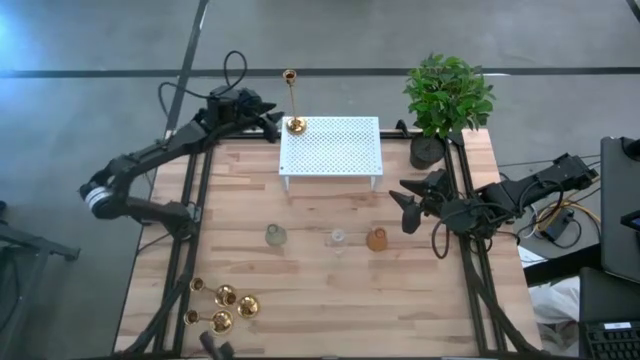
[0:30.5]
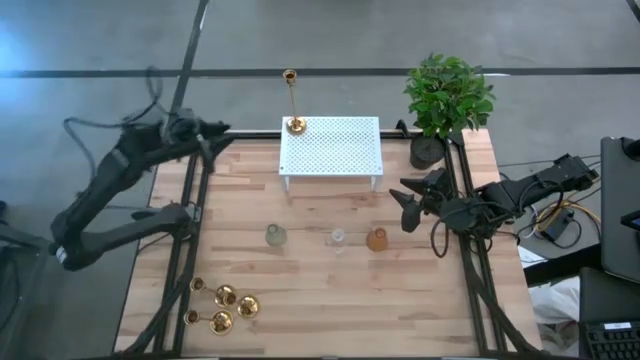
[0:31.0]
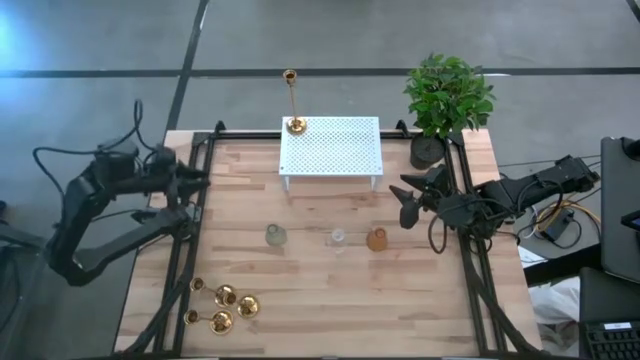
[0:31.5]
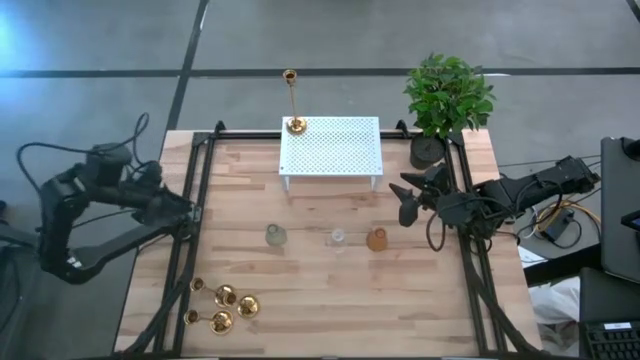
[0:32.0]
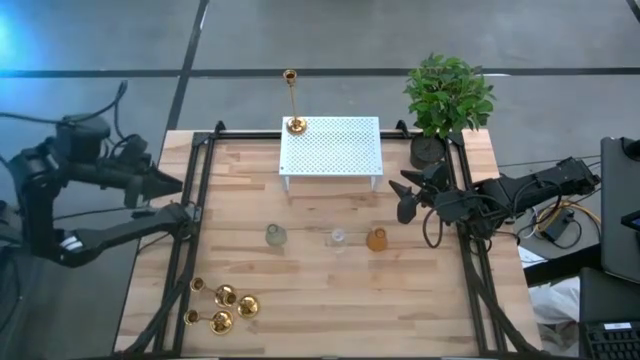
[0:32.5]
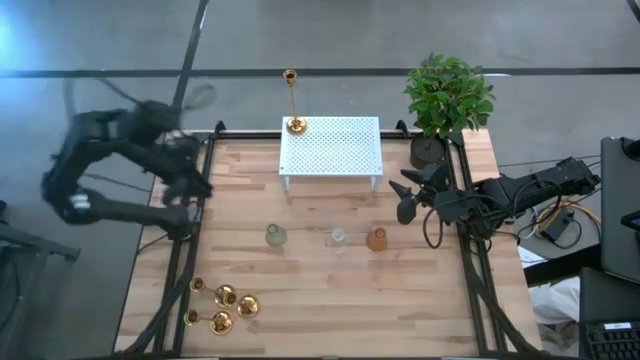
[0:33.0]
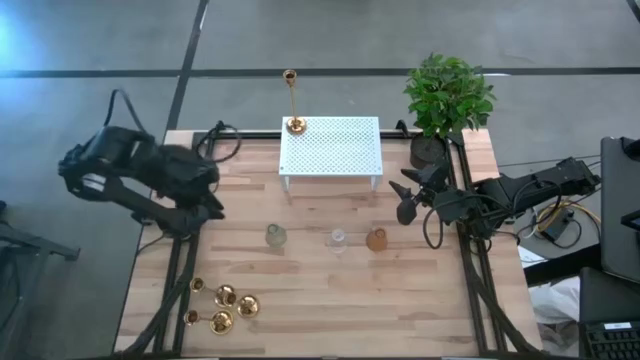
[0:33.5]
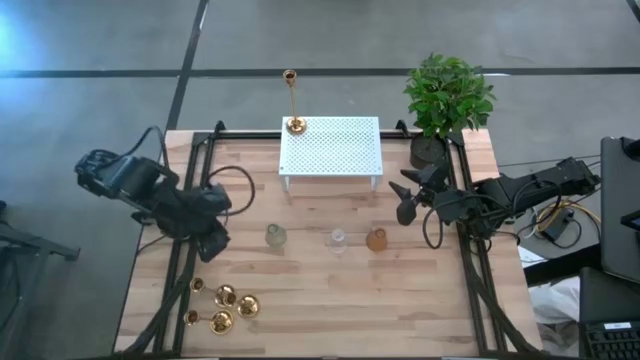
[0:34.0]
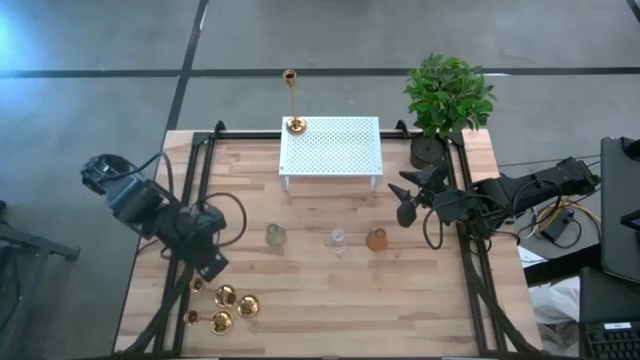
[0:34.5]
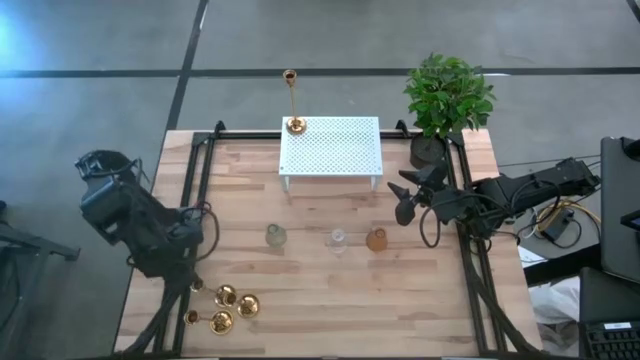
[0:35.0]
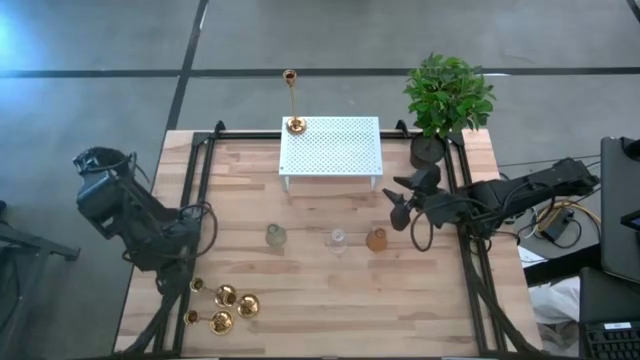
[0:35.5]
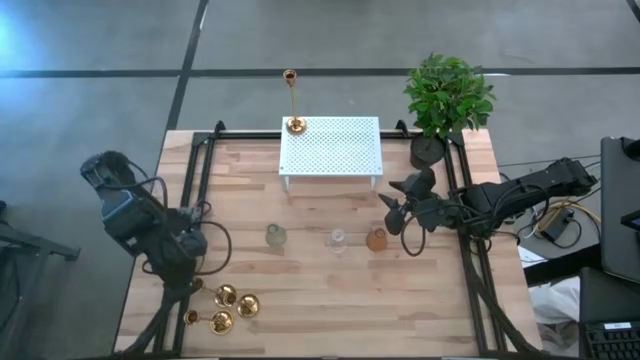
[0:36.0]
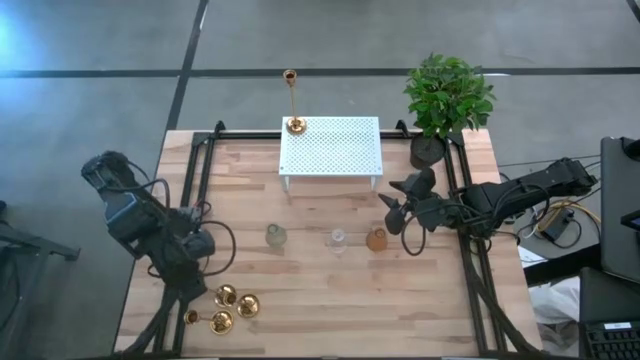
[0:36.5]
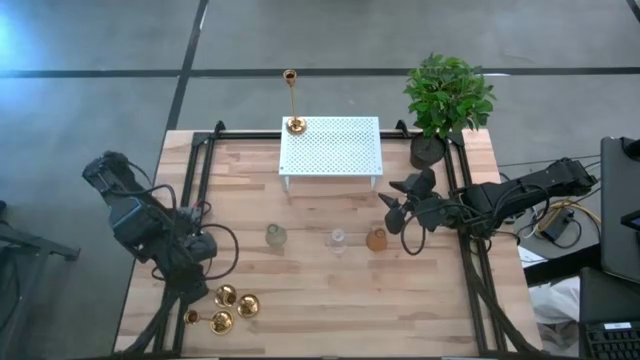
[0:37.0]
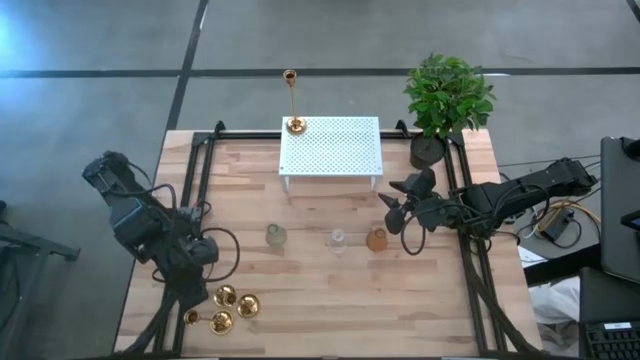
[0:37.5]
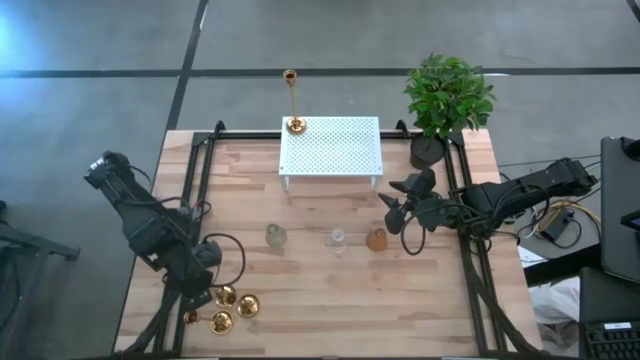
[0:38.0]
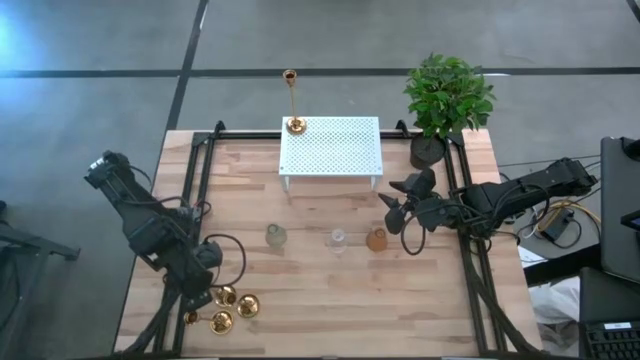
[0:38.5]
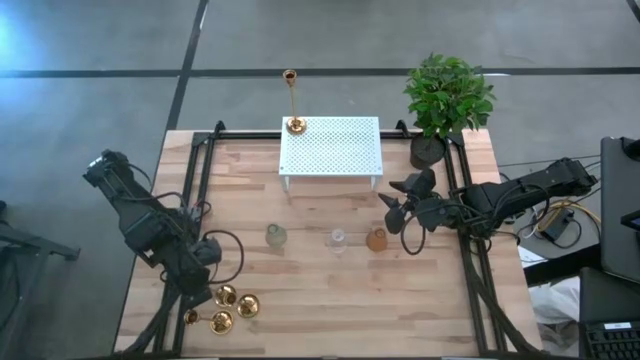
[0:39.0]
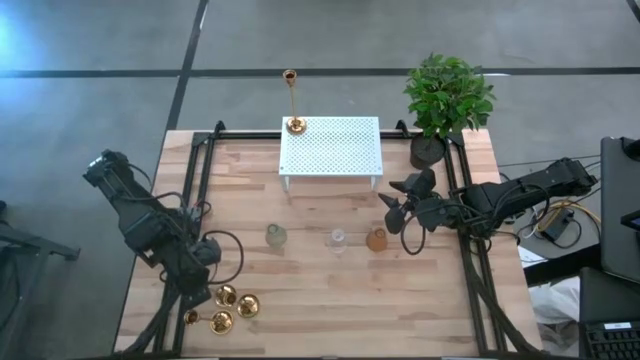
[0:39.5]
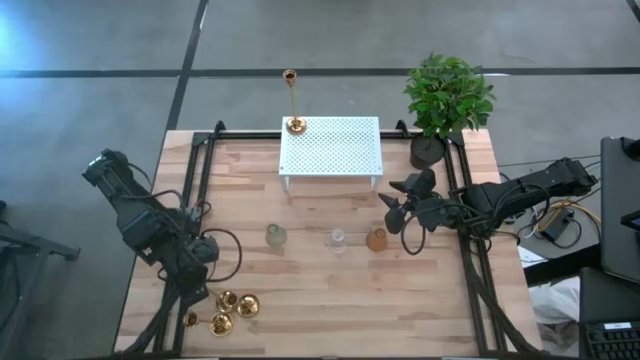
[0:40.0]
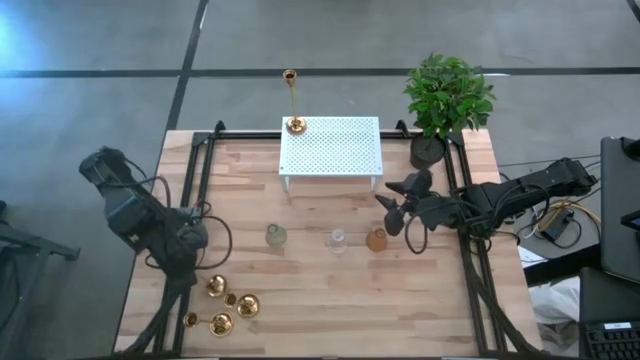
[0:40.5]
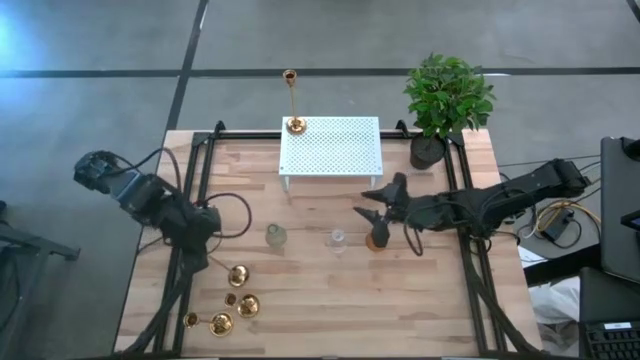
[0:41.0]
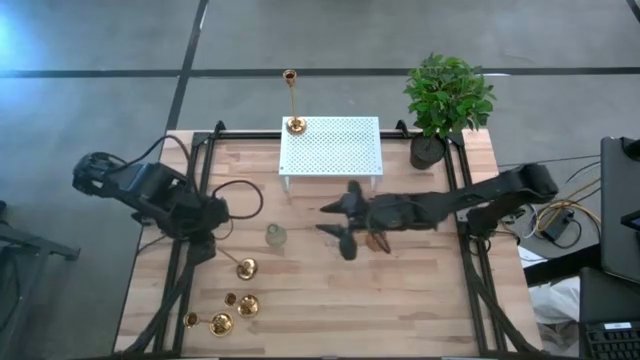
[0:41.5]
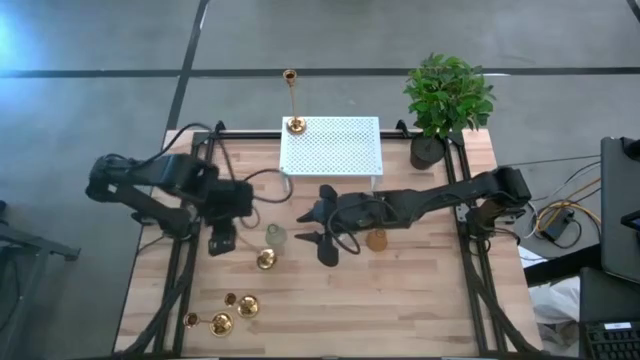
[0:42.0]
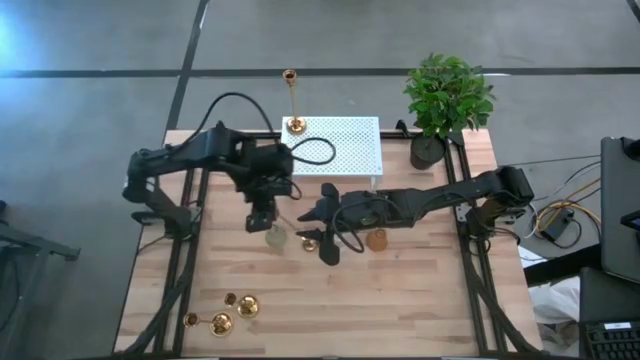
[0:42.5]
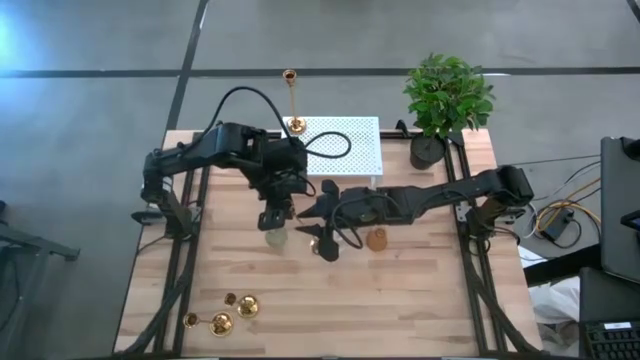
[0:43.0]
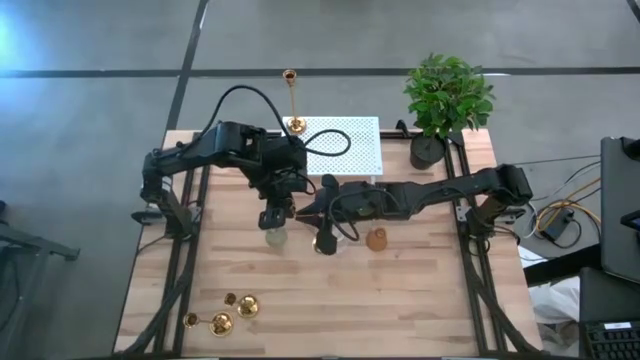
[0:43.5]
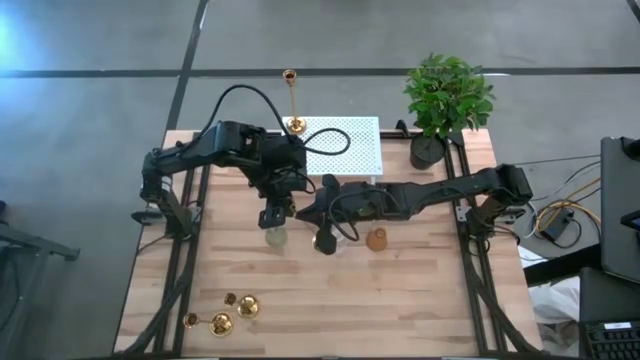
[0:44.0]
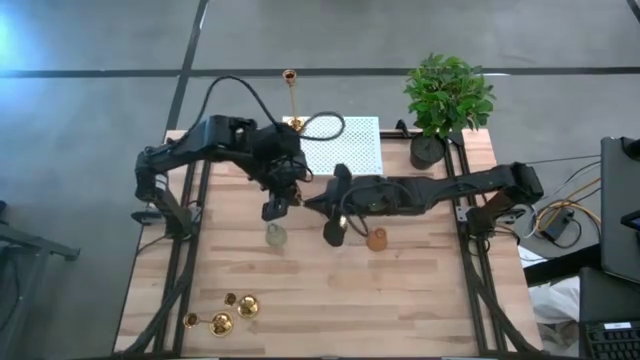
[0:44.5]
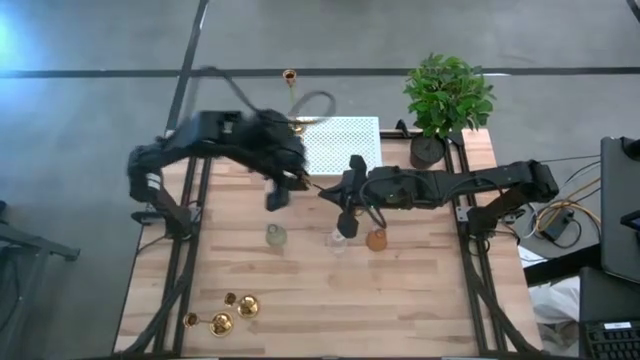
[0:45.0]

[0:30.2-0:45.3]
Task: Pick & Place candle stick holders
Align the gold candle holder with the other gold candle holder on the shelf

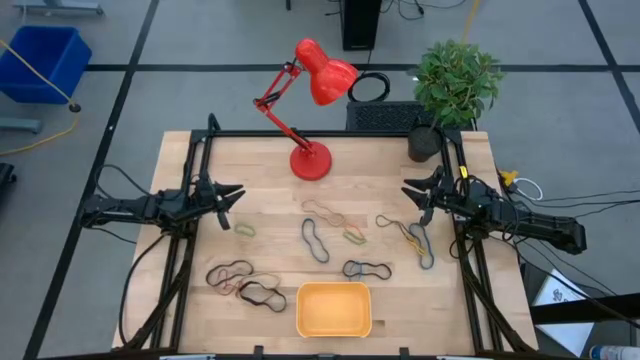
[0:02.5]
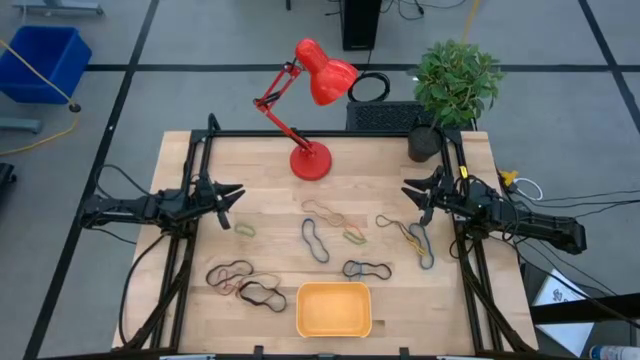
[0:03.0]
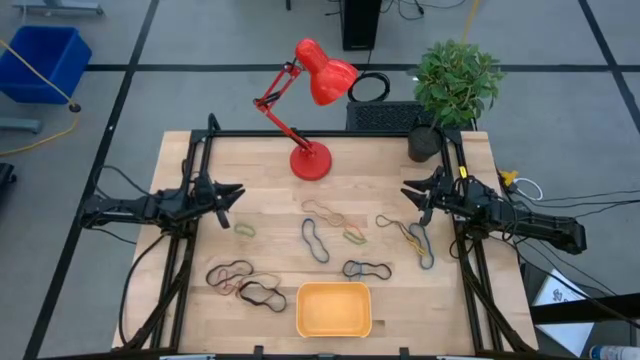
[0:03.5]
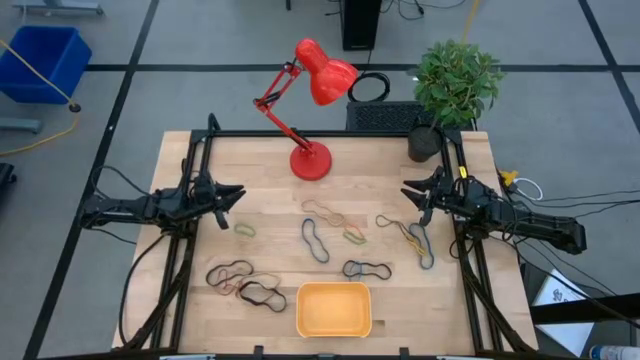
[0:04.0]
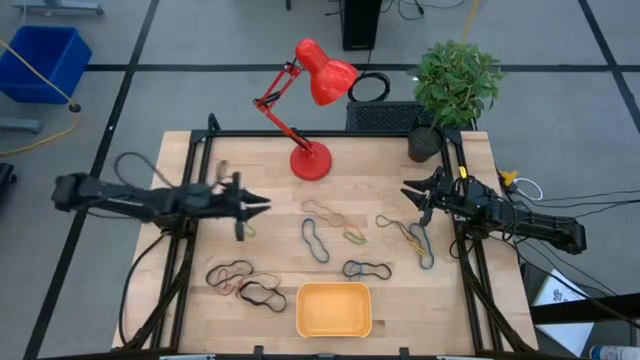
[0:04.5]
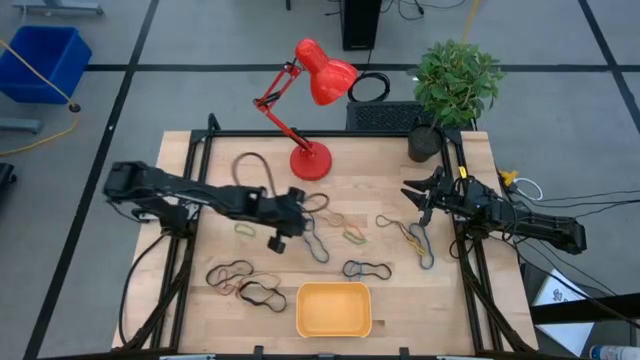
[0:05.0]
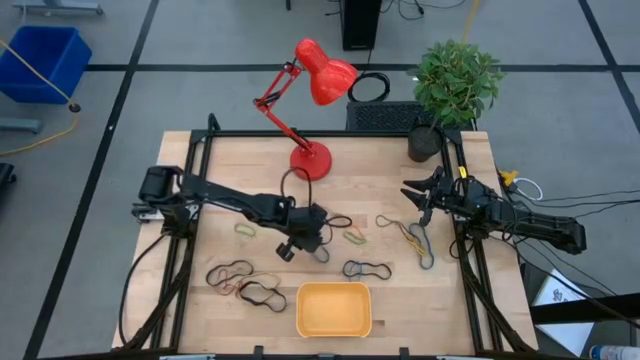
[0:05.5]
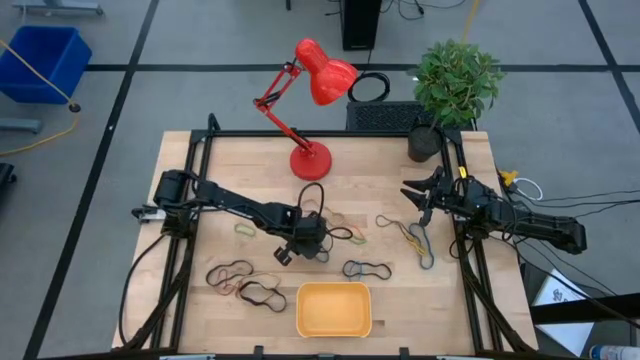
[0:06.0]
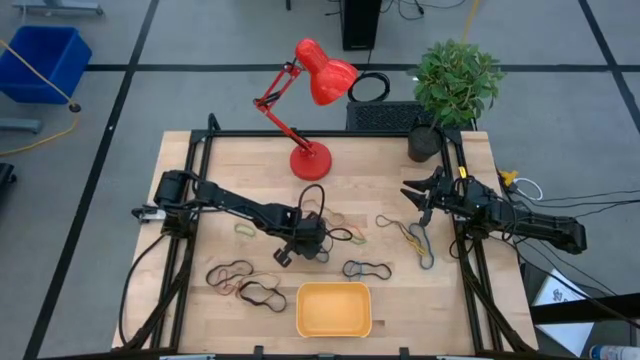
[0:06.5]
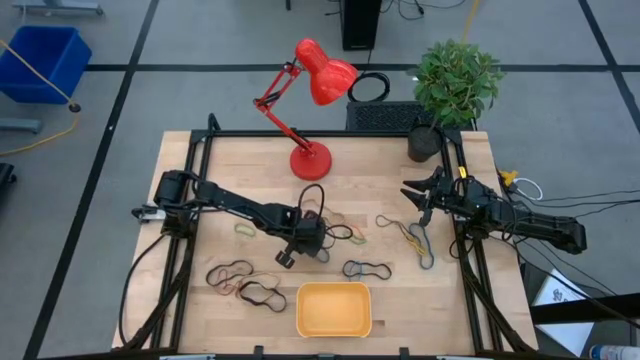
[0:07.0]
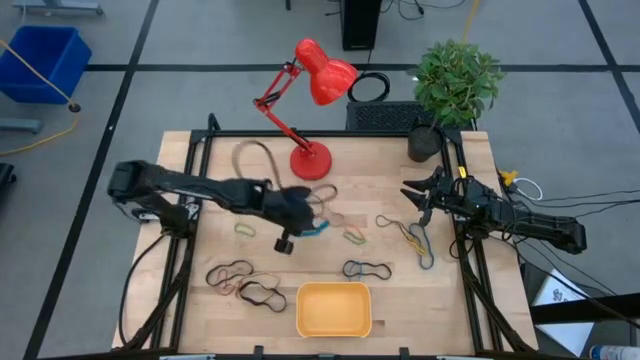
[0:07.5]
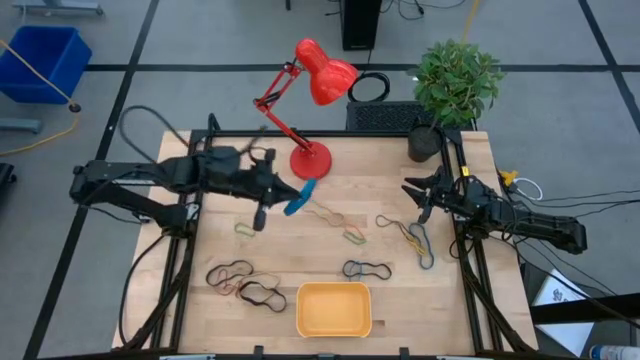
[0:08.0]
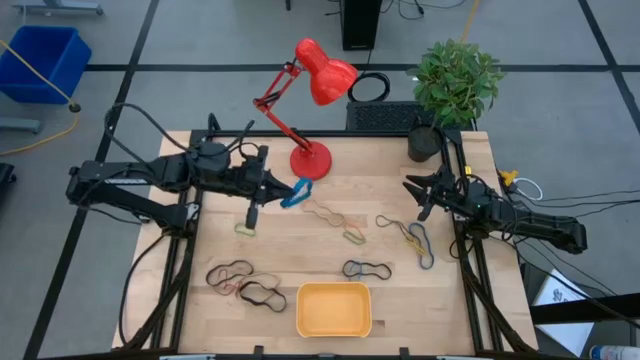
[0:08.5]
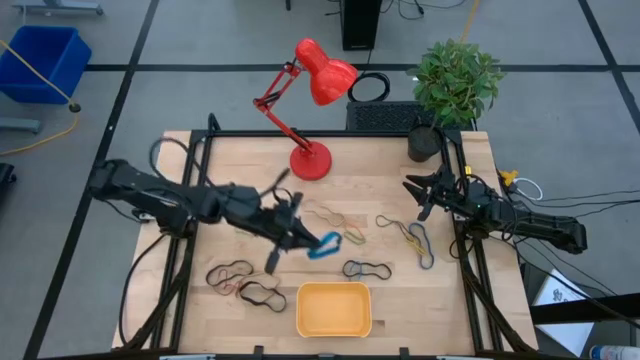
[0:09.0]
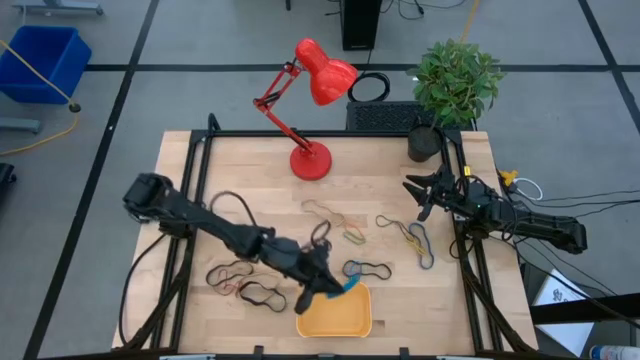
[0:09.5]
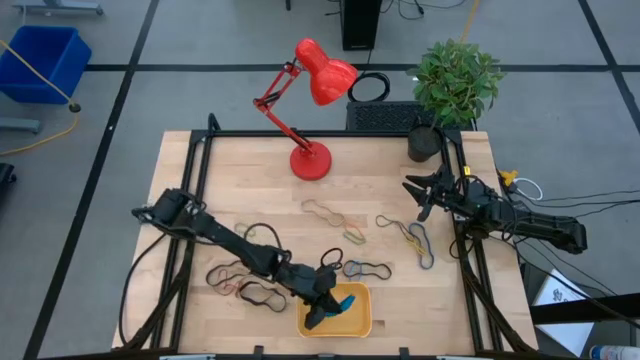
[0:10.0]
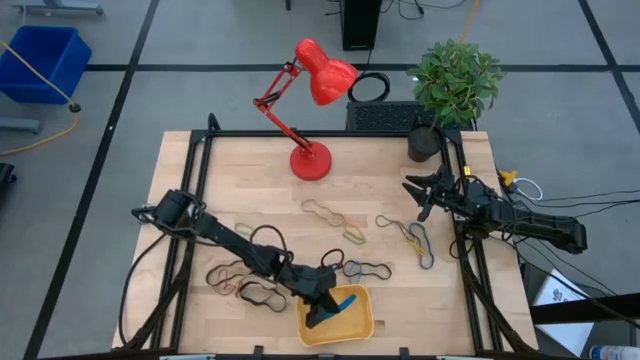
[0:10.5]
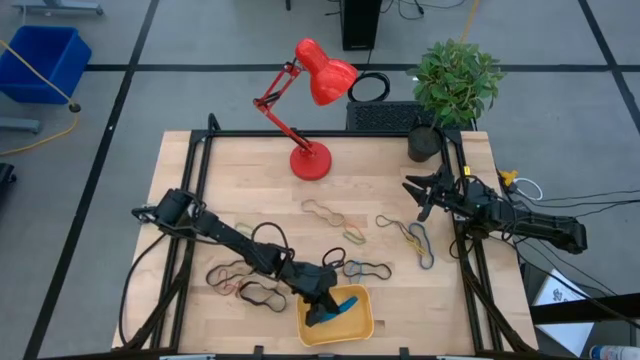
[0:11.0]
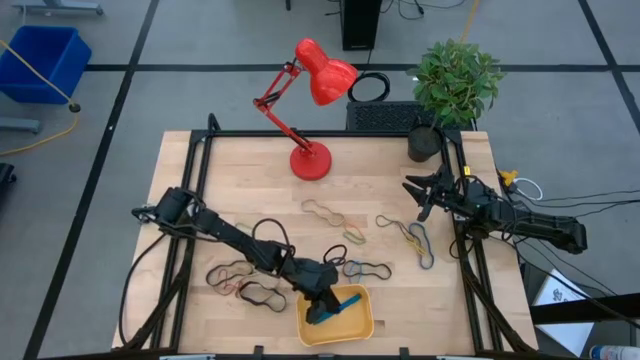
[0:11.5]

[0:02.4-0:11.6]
Task: Pick and place rubber bands into bin
Put the blue rubber band into the yellow bin
